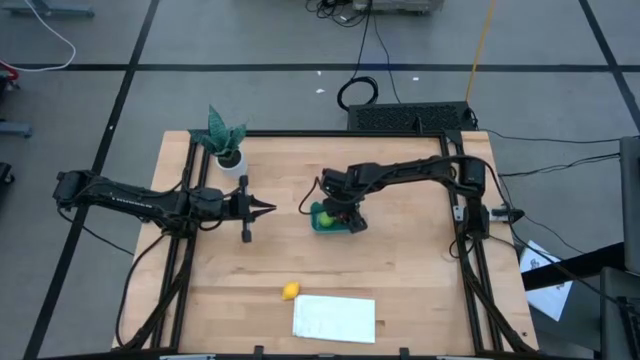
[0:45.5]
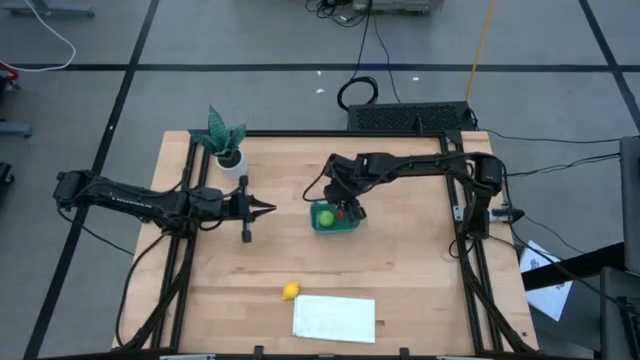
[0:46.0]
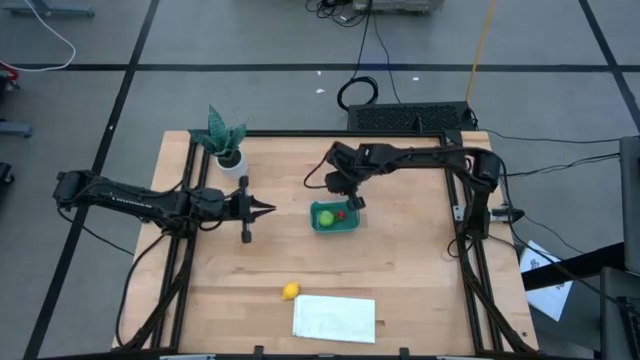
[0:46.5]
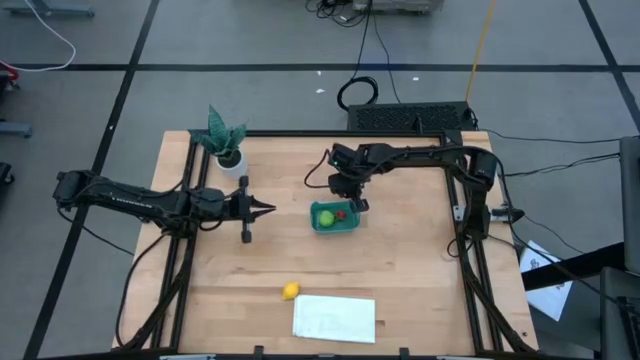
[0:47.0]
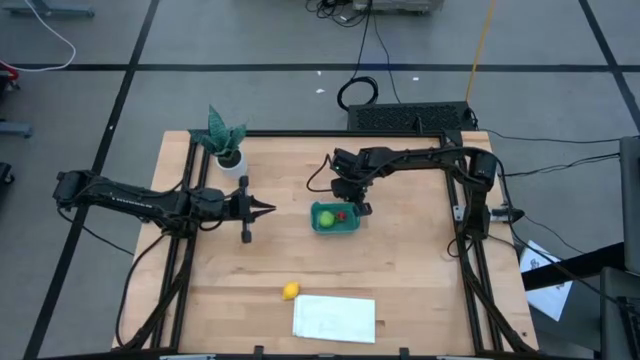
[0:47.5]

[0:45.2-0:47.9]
Task: Pick and placing Produce into tupperware
Adjust the bin

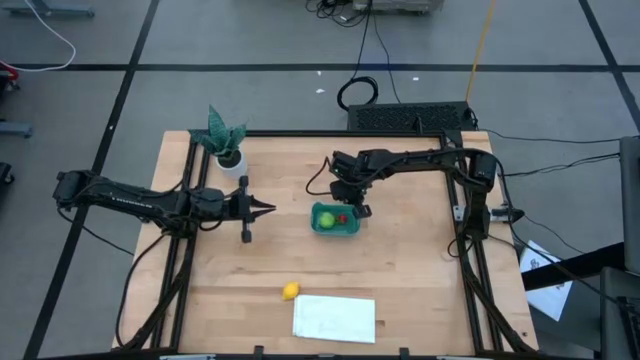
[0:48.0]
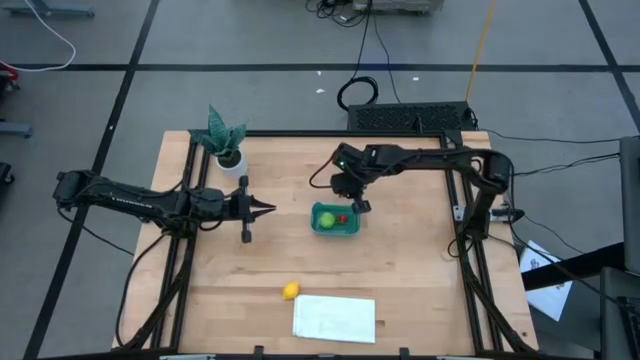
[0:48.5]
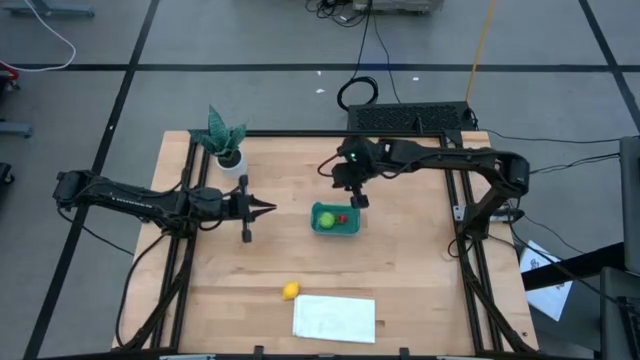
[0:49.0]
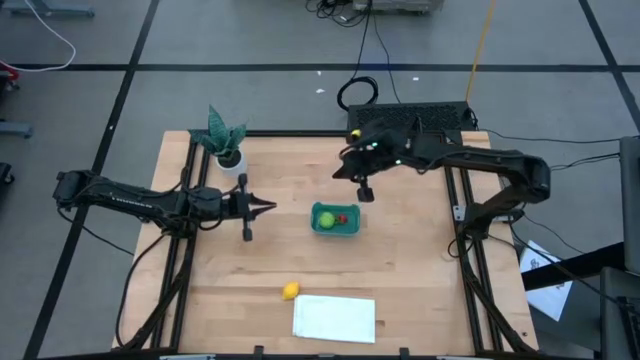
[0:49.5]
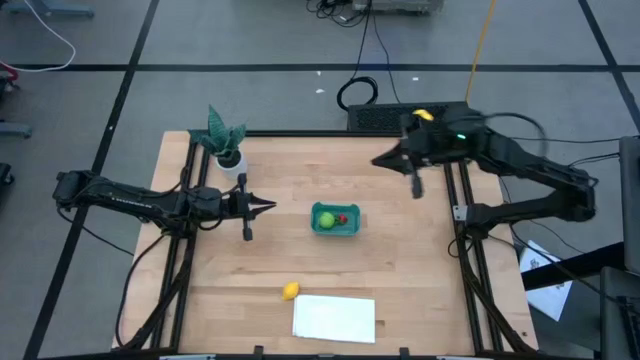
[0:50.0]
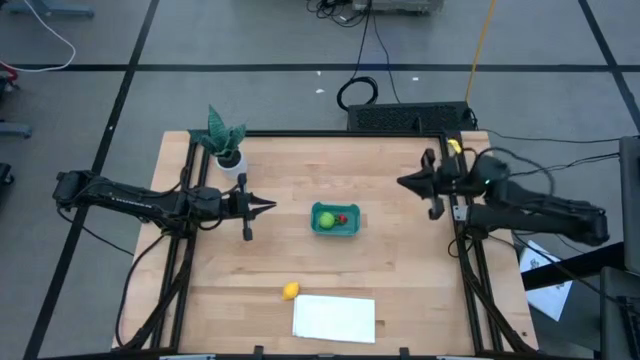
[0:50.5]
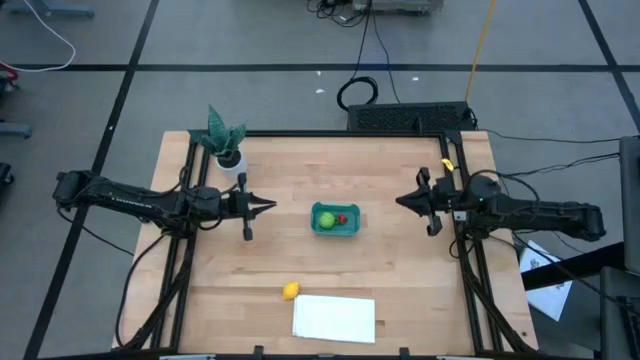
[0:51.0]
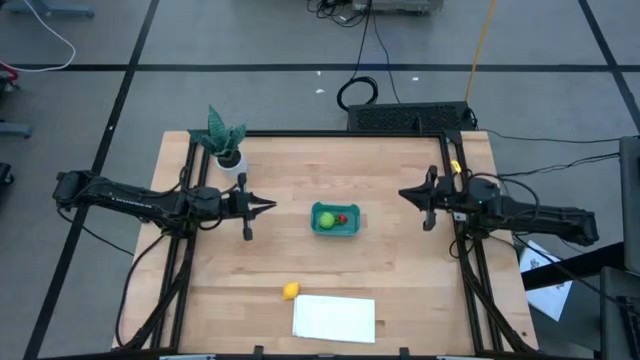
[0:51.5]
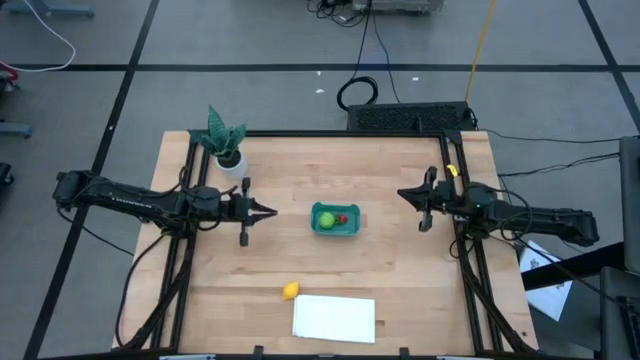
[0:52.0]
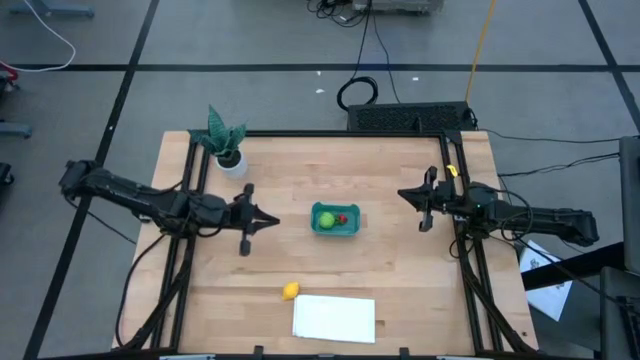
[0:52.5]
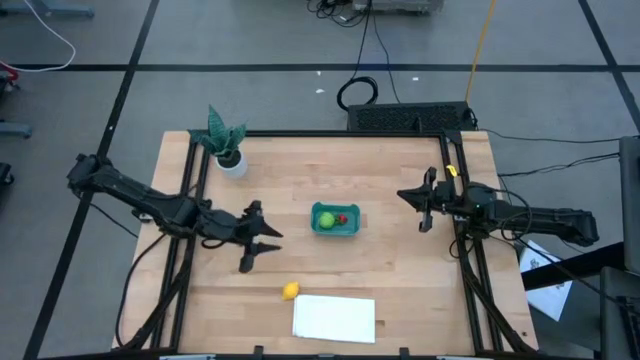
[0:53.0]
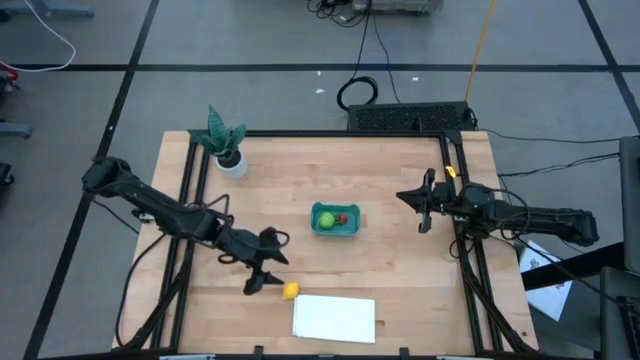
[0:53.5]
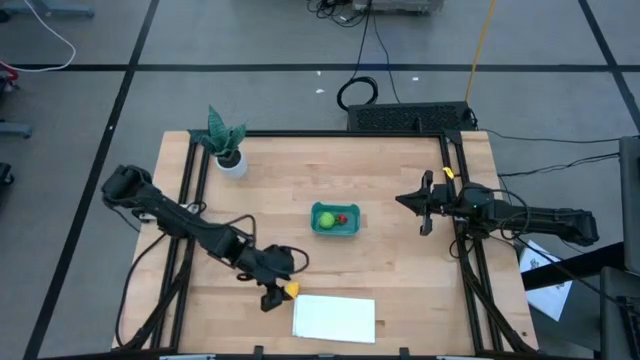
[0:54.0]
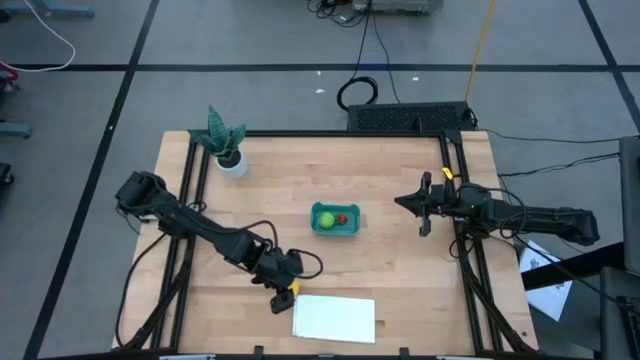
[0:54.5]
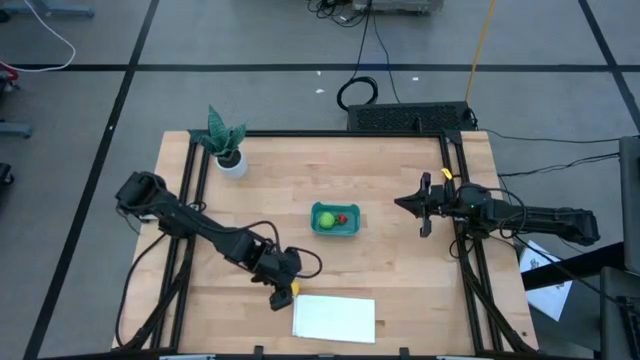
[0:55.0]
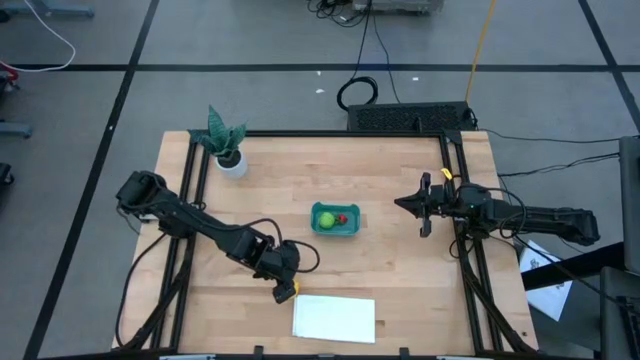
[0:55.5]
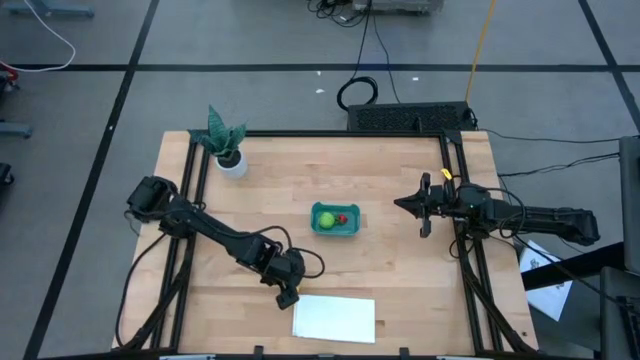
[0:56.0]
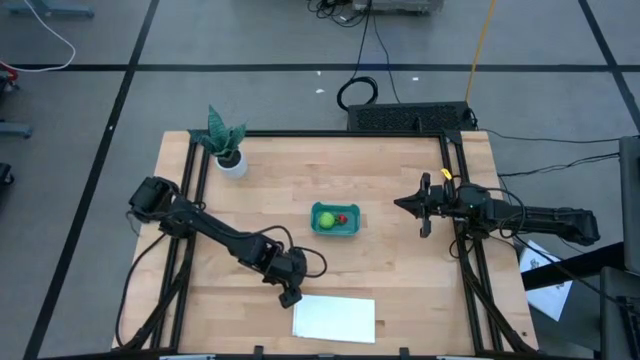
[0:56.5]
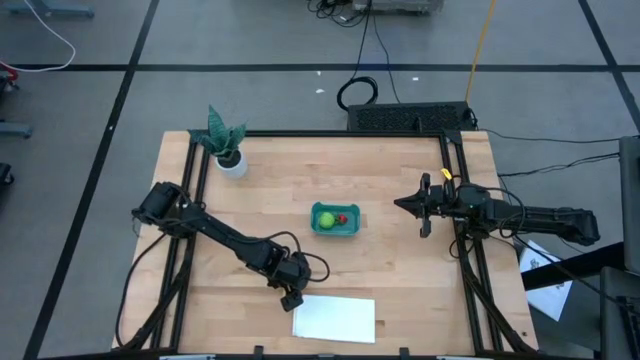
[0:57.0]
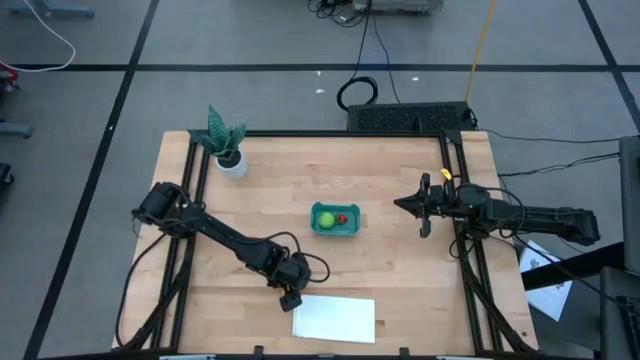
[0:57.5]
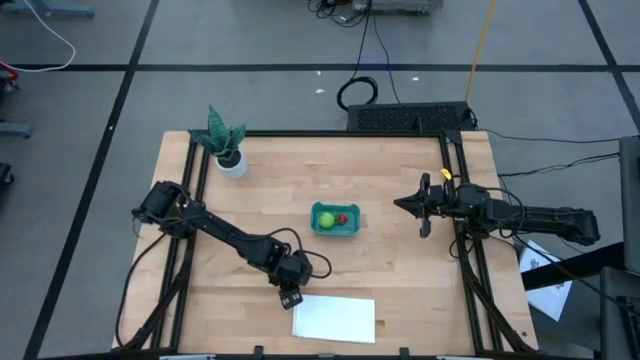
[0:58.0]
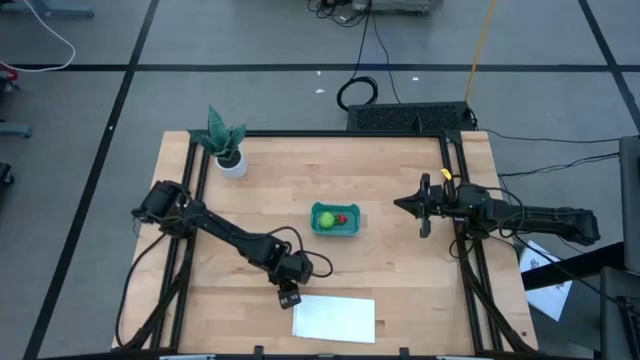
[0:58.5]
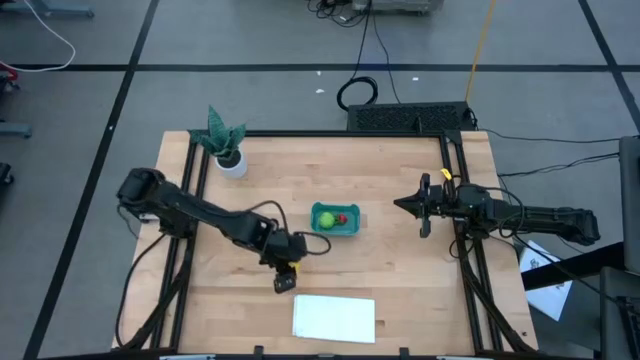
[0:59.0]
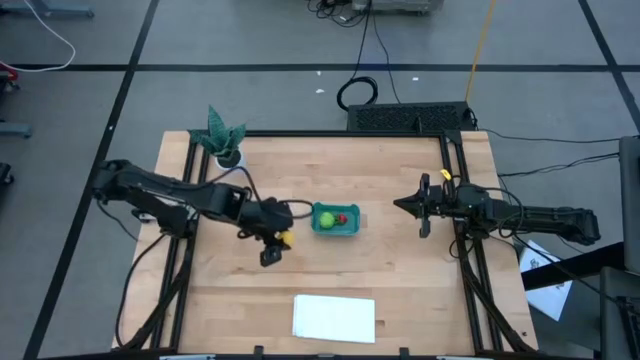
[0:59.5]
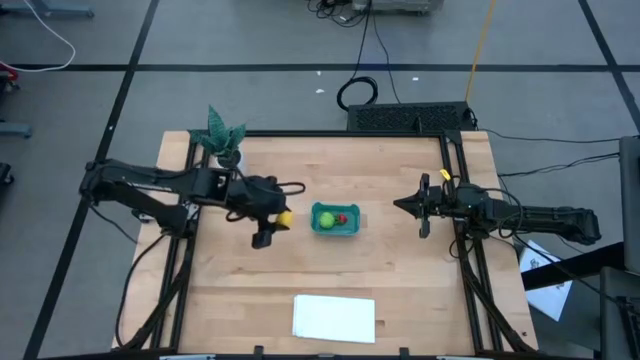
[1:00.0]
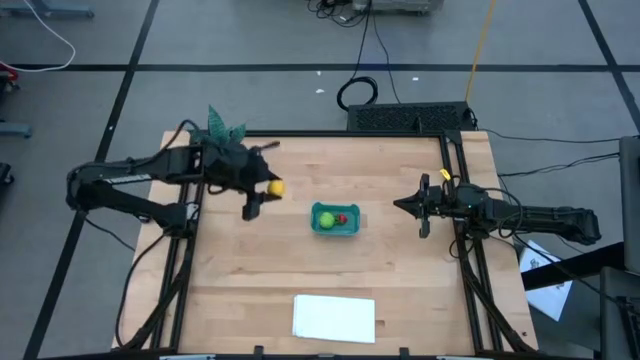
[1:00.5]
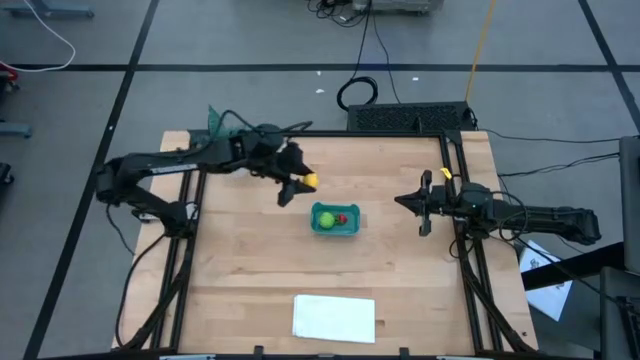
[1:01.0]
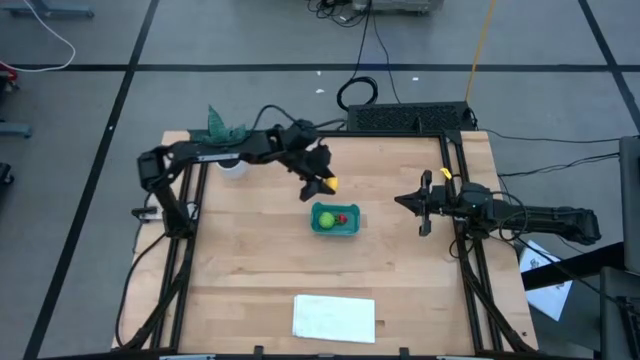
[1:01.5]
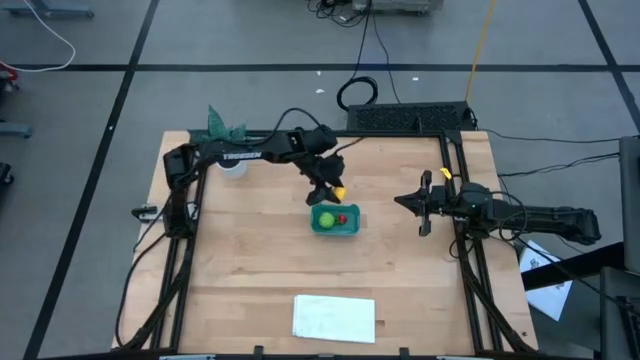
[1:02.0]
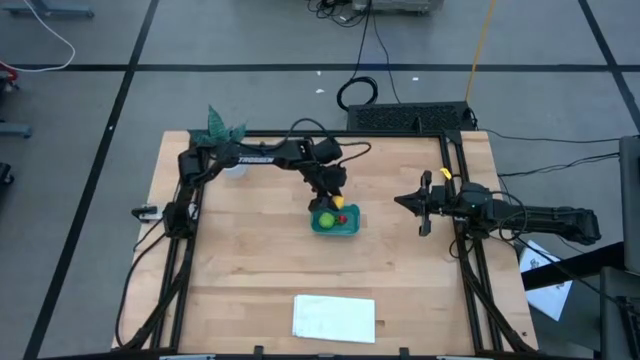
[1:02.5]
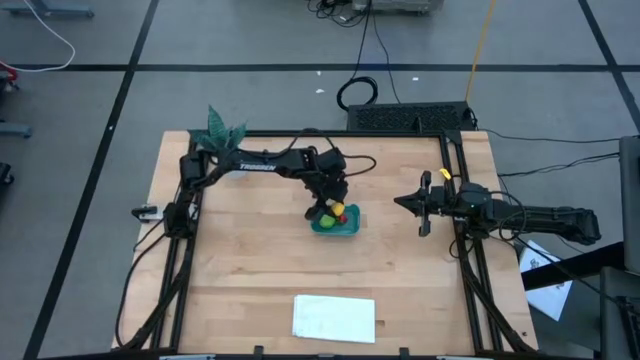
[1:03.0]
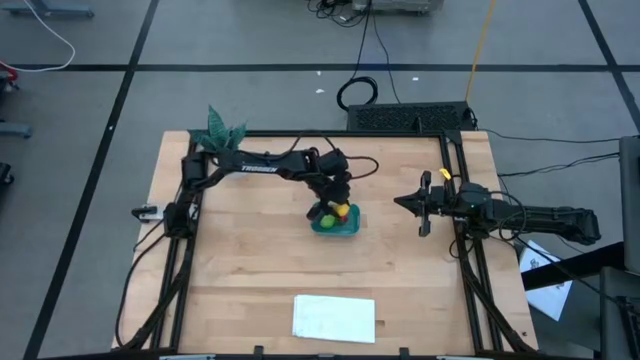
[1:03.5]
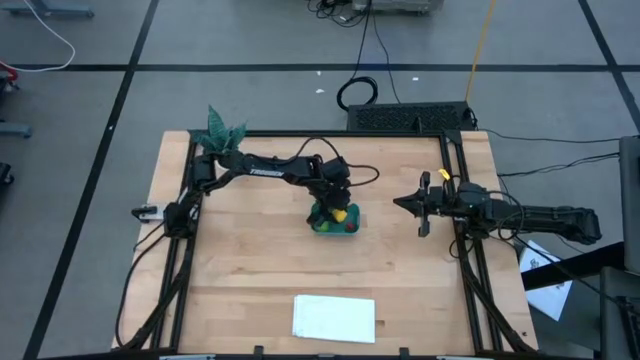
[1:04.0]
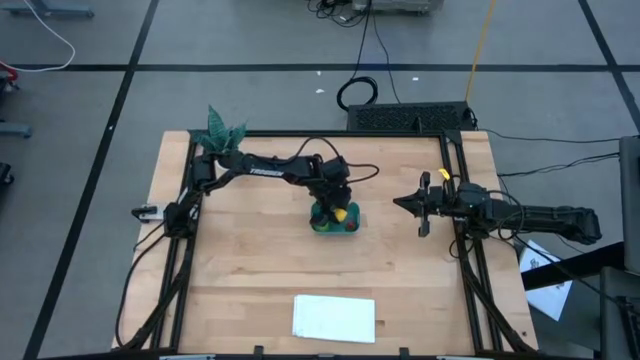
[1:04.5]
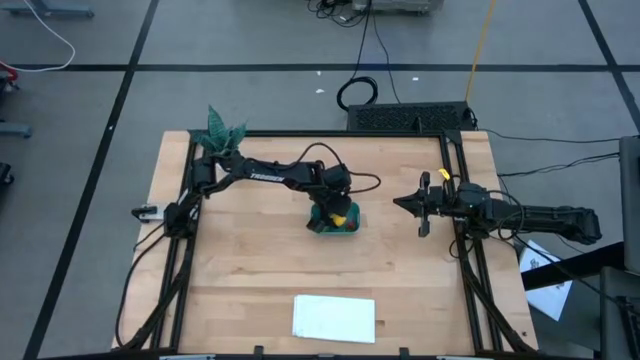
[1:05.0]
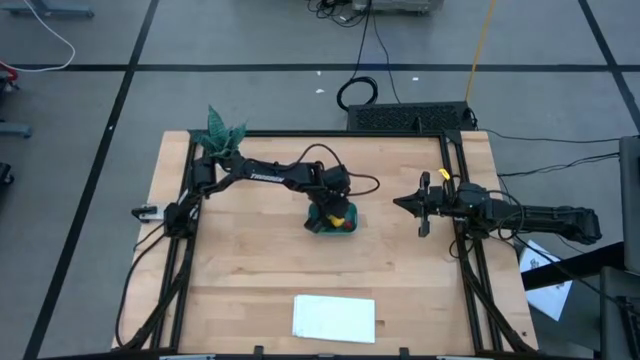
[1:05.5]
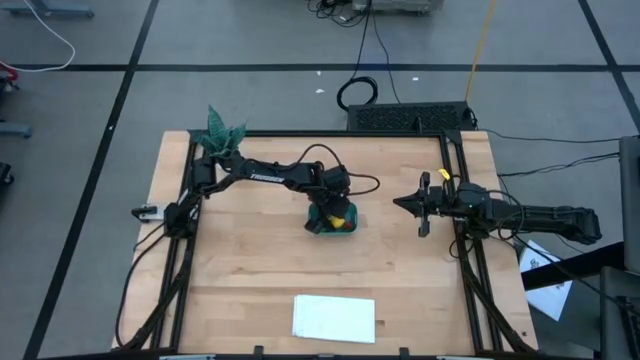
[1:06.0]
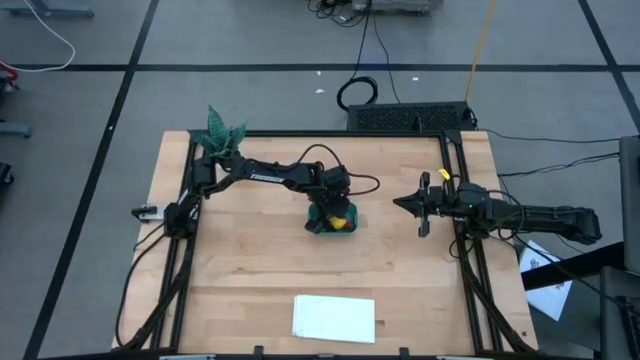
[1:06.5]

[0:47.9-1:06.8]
Put the yellow lemon into the green bin
